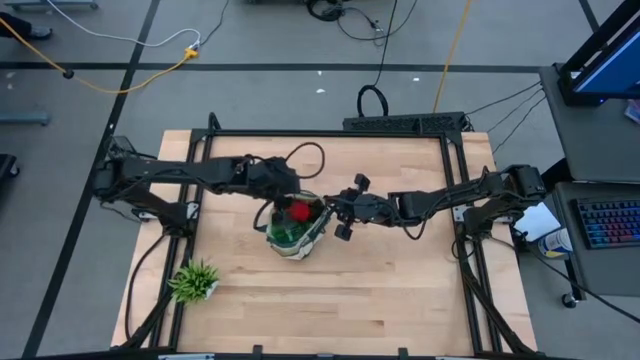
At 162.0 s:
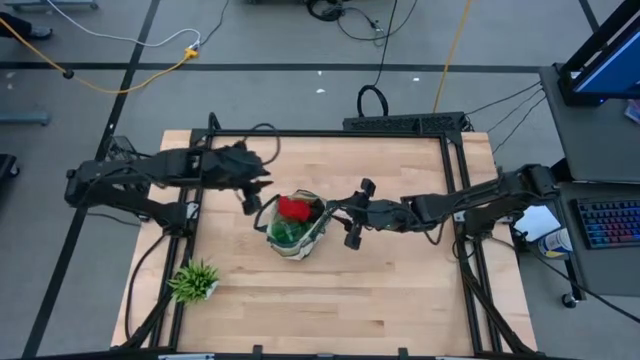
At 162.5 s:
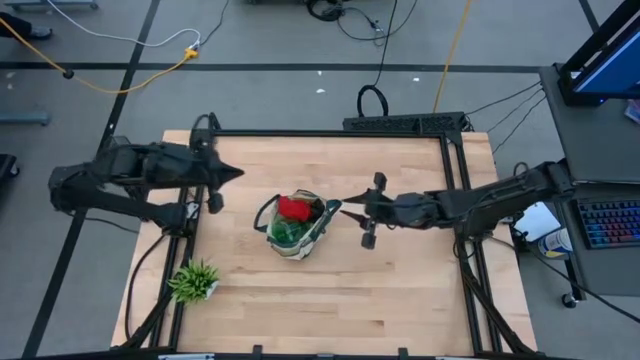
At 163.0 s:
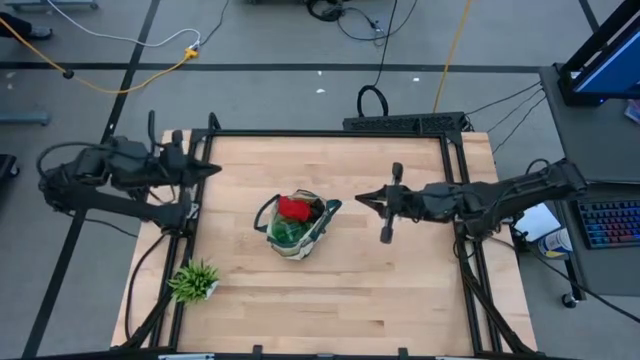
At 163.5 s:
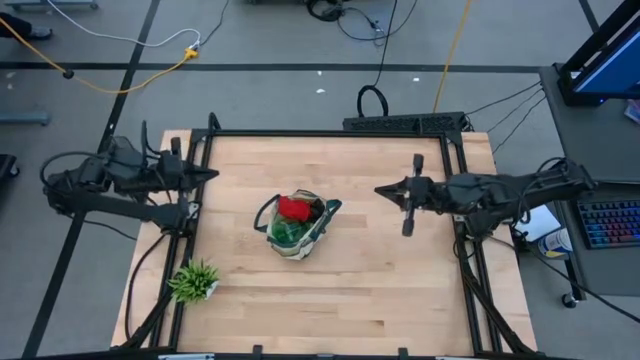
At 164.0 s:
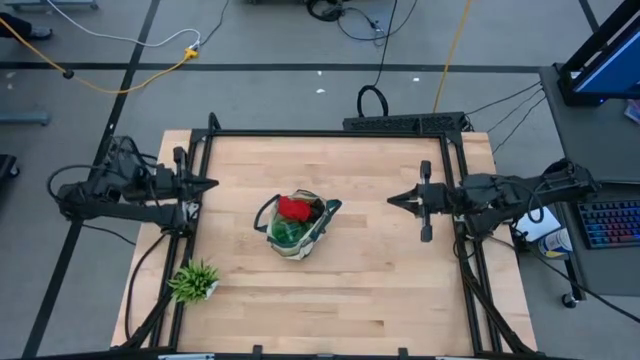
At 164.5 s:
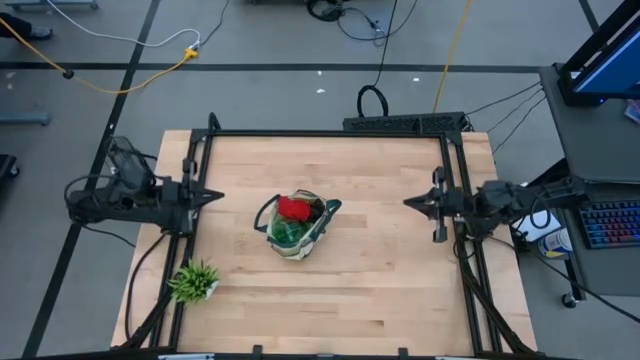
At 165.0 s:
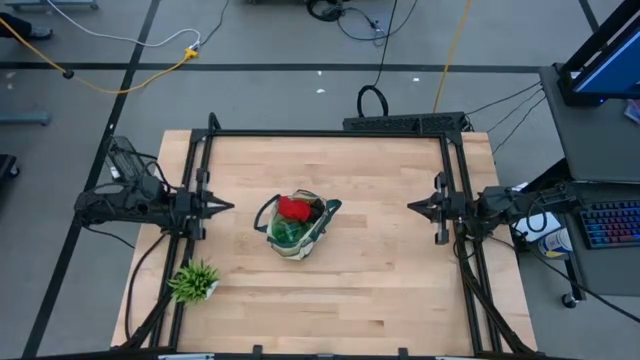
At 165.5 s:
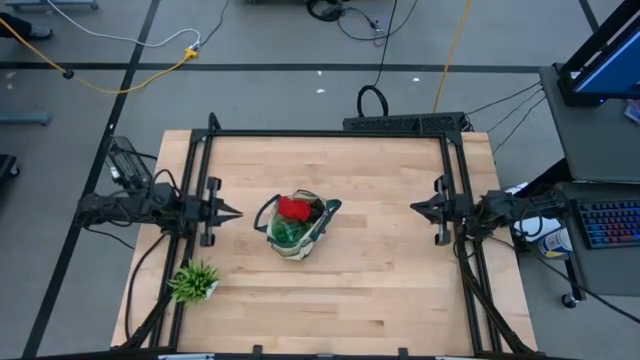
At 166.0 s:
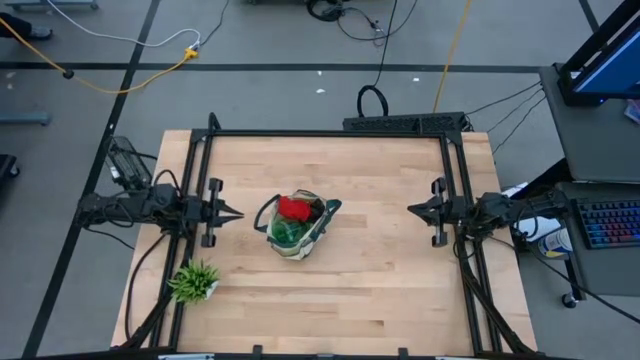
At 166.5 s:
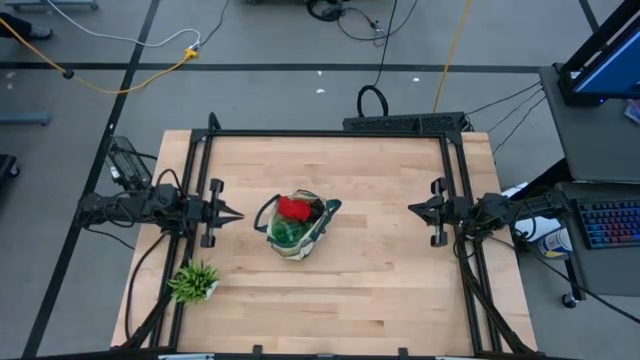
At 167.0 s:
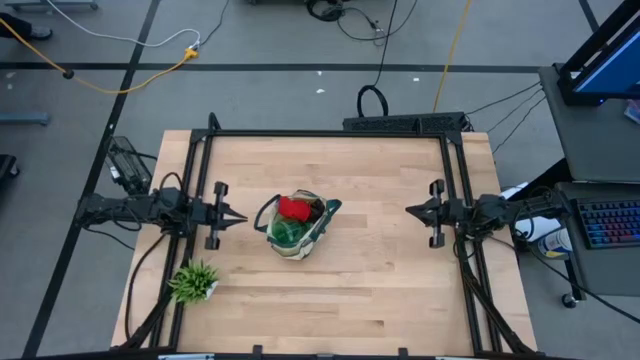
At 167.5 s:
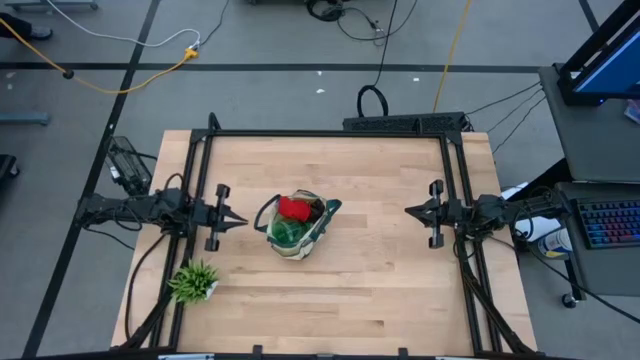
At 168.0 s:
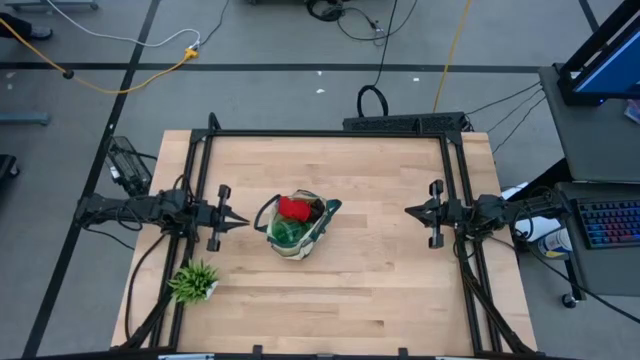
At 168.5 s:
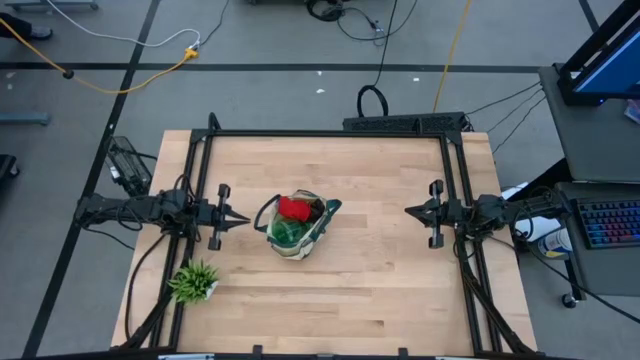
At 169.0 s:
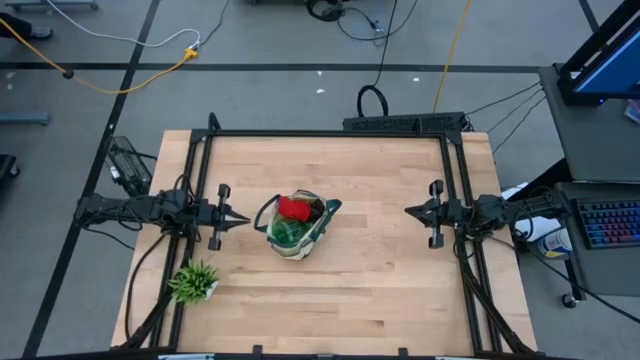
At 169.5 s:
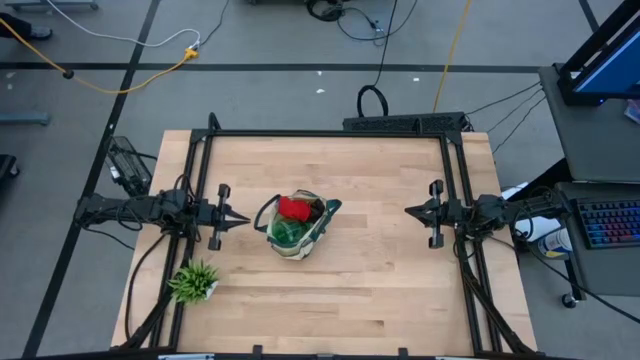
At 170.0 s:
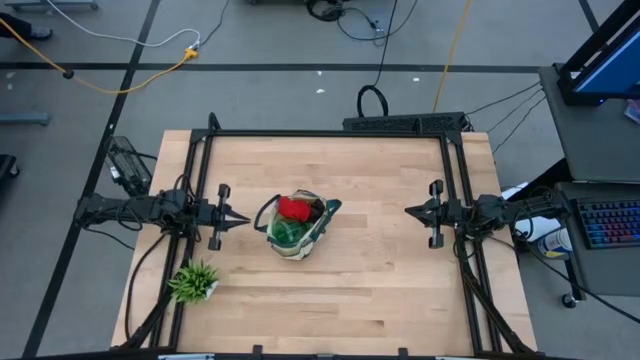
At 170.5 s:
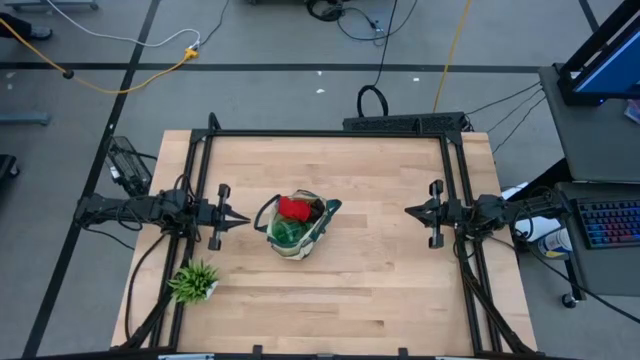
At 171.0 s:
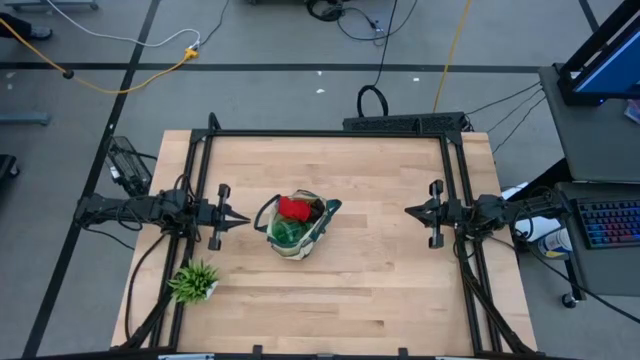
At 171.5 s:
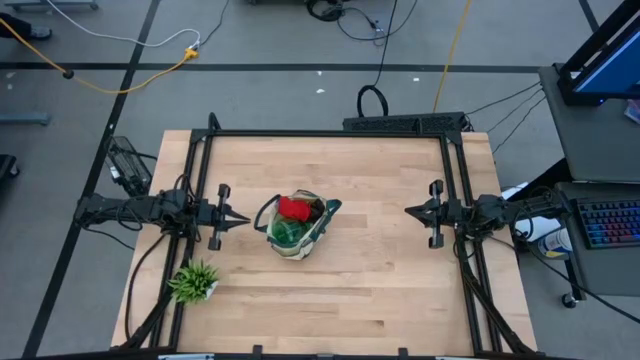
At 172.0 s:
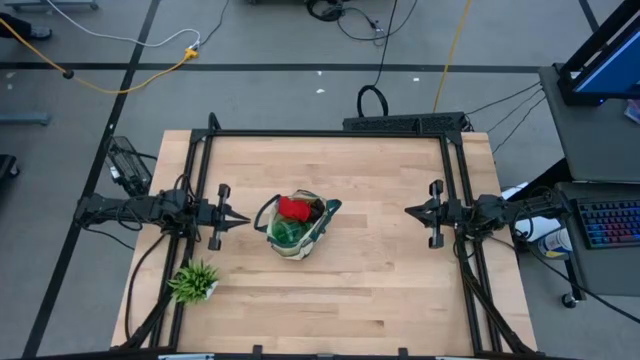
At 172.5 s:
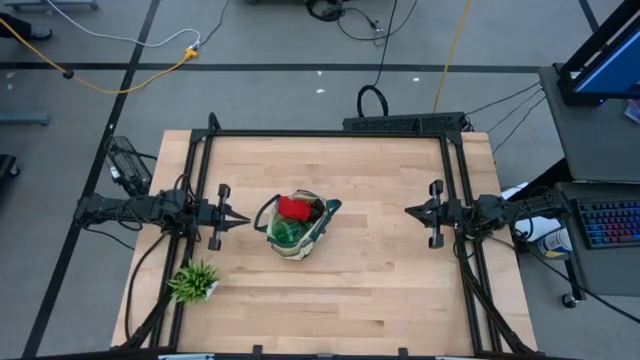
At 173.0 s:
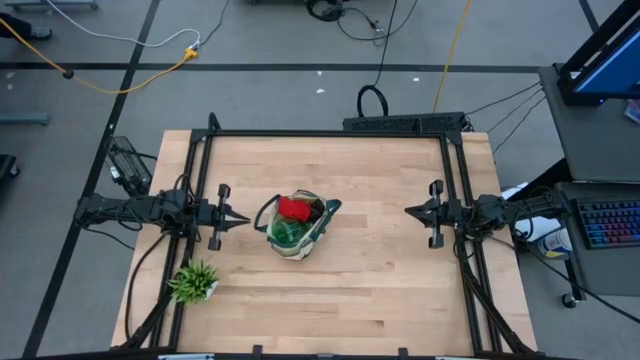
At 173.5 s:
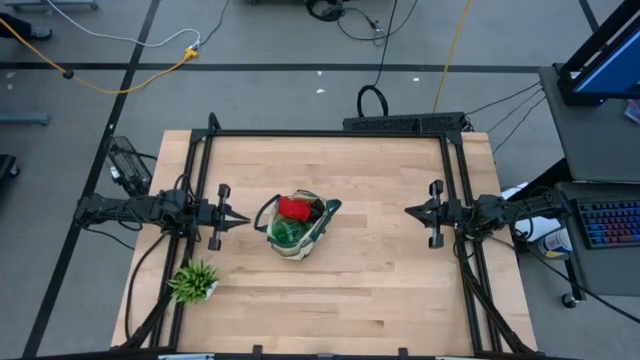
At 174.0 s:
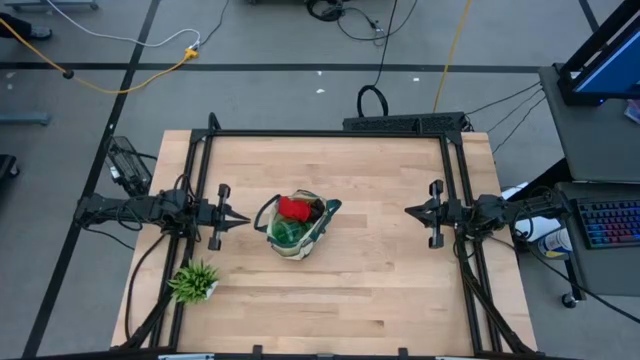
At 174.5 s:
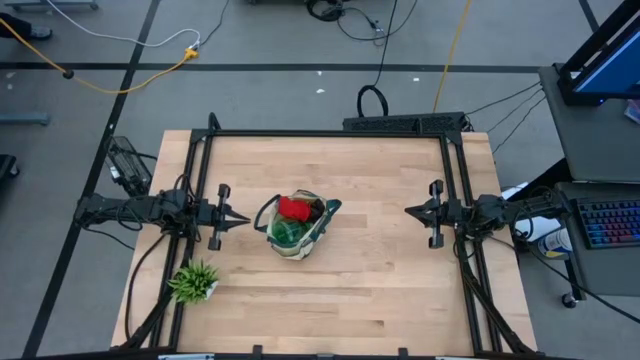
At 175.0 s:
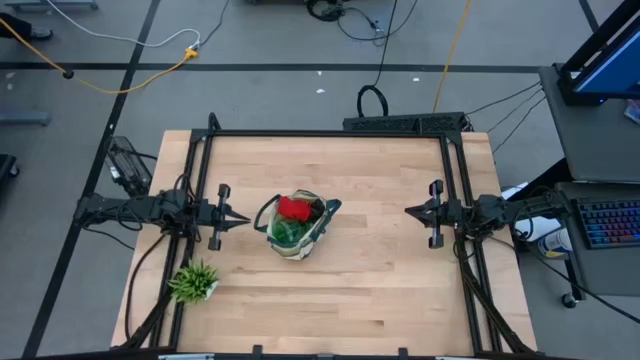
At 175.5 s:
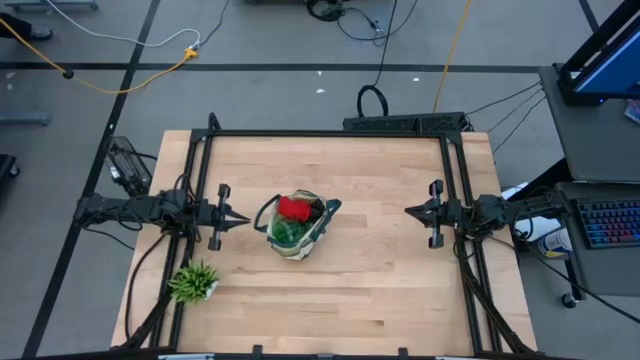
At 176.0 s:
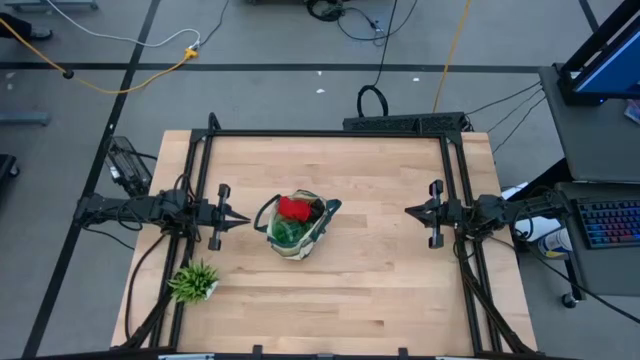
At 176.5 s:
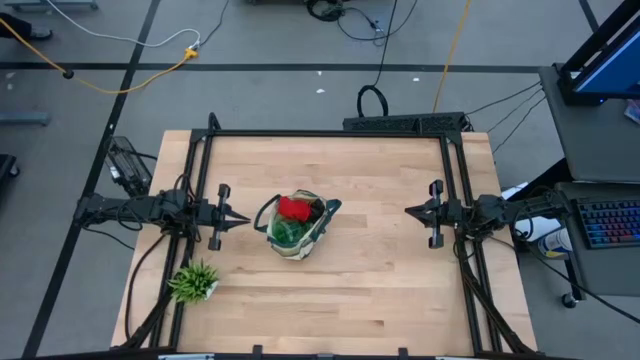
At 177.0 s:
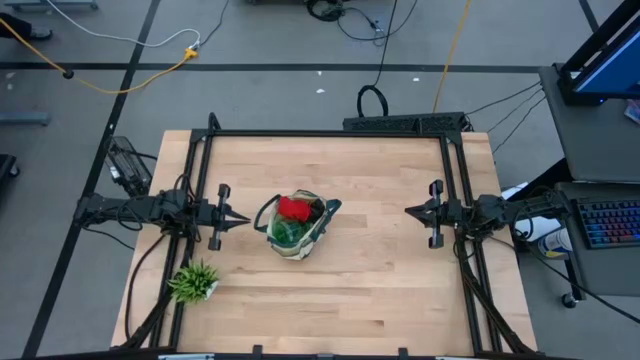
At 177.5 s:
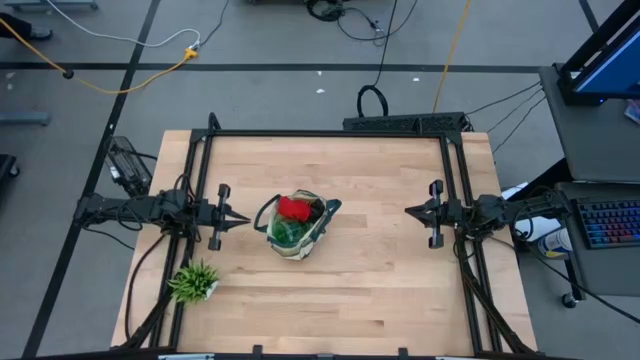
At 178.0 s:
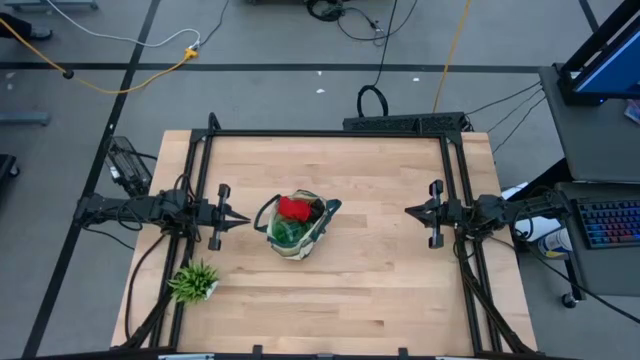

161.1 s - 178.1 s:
Task: Pick & Place Garden tools in Gardening bag
Return to Home Position

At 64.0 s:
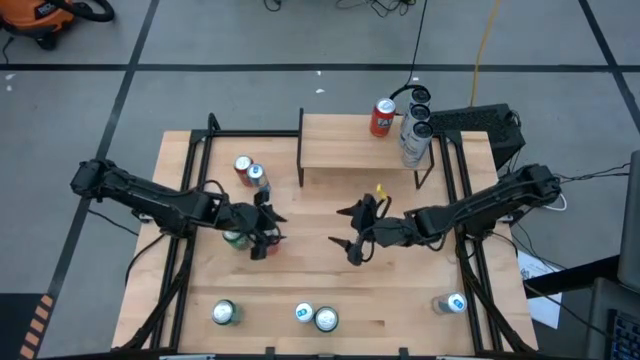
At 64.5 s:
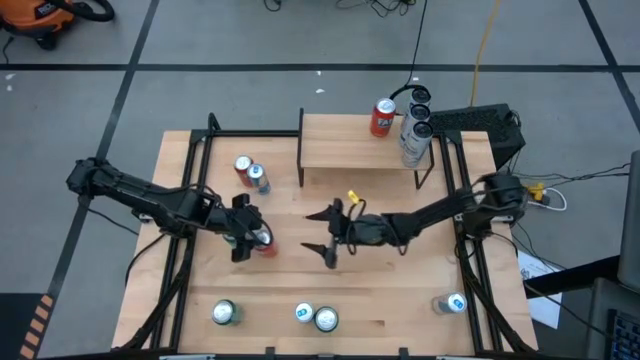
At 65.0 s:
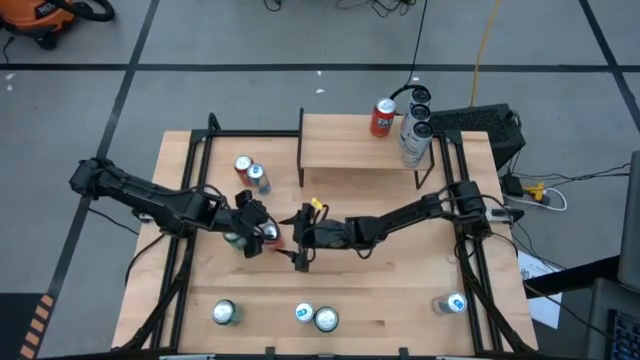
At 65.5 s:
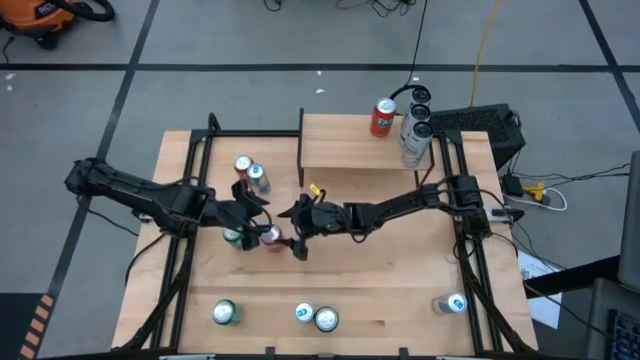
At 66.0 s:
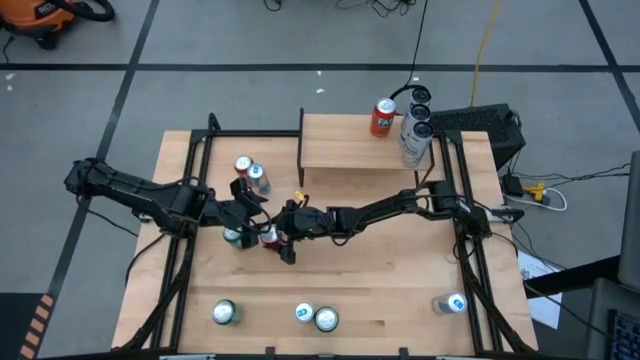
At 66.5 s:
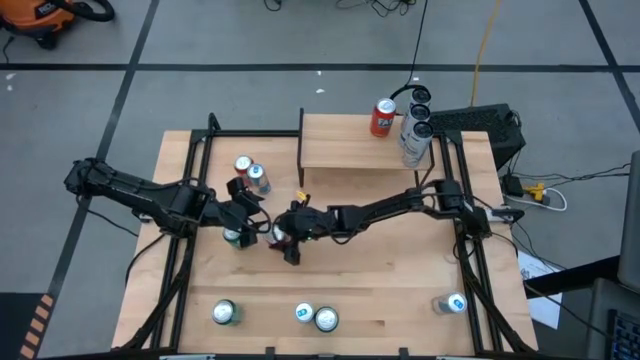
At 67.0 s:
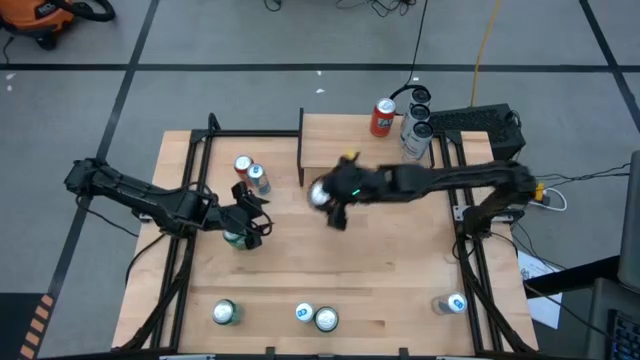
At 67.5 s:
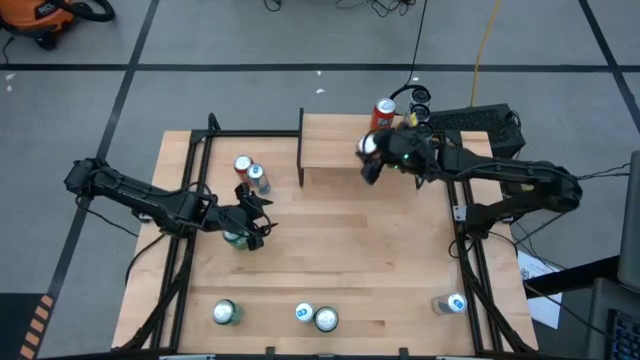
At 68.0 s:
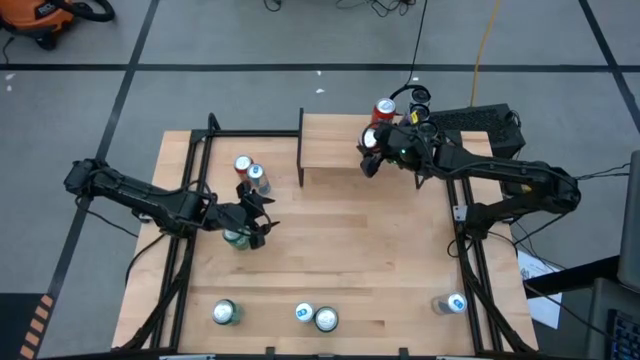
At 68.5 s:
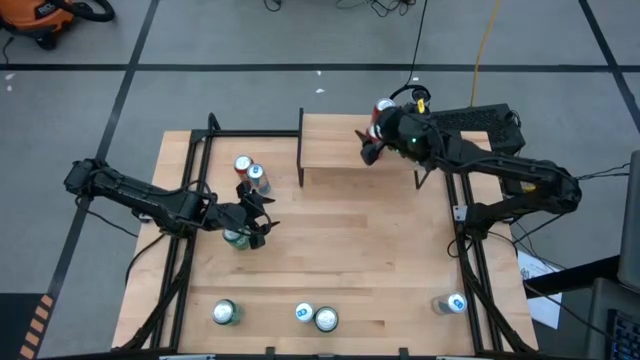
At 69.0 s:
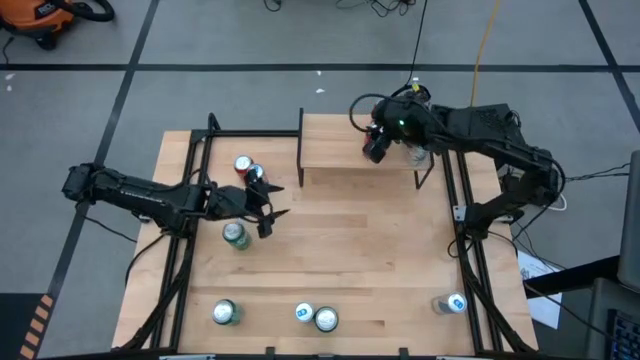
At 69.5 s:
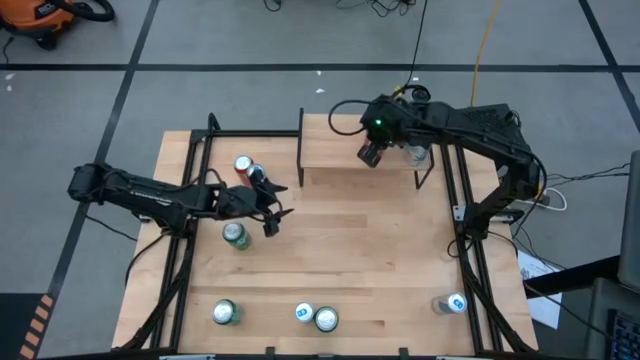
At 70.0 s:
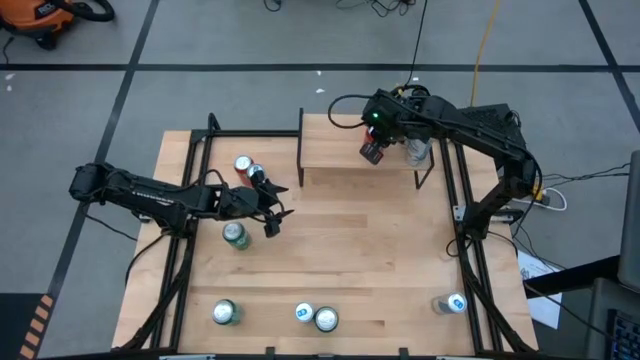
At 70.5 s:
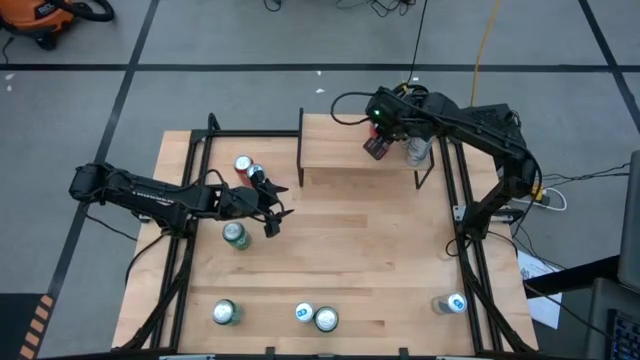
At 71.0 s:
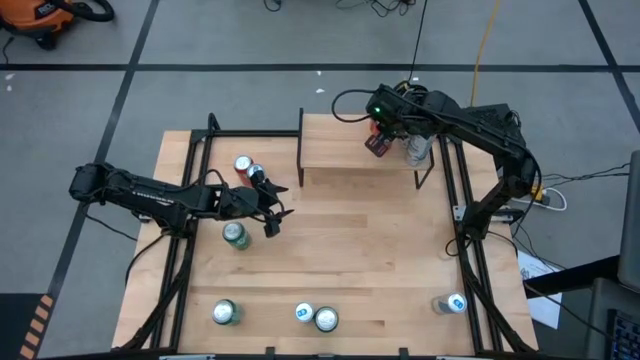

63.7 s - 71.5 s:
Task: Place canned beverage on shelf
Put the bottom red soda can on the shelf aligned with the other red soda can
